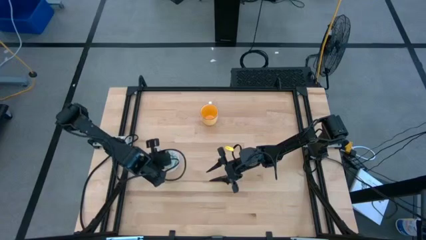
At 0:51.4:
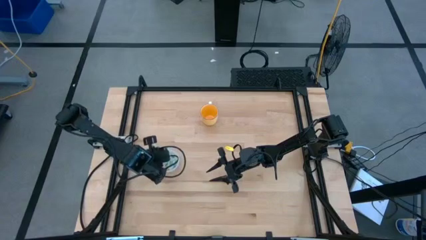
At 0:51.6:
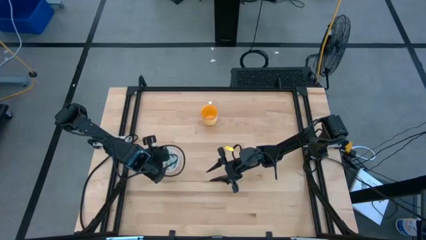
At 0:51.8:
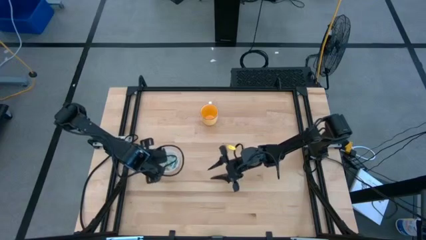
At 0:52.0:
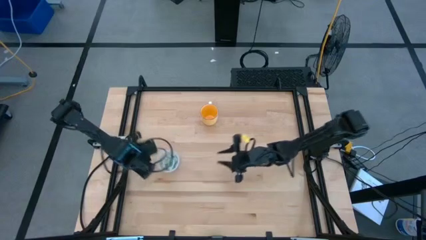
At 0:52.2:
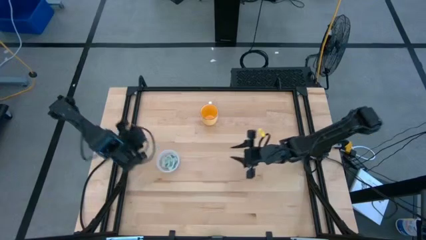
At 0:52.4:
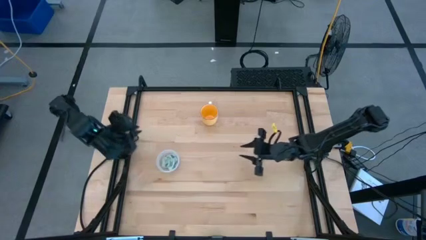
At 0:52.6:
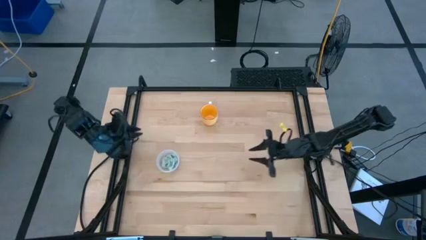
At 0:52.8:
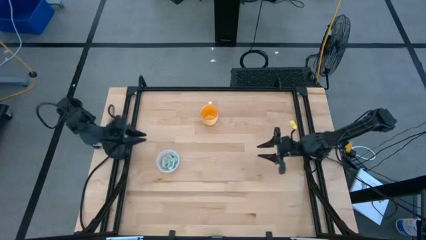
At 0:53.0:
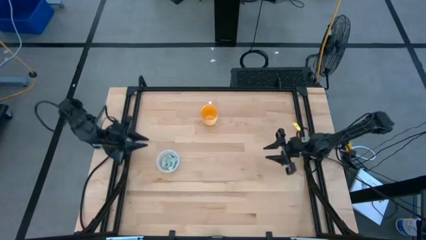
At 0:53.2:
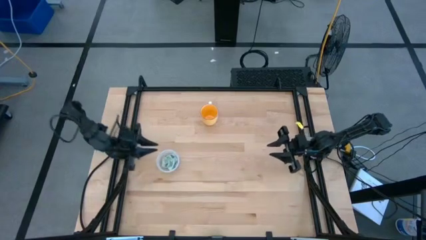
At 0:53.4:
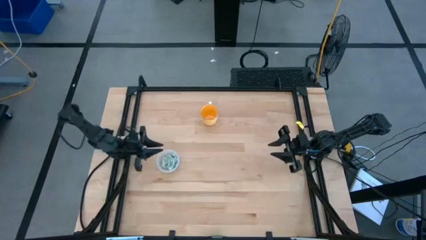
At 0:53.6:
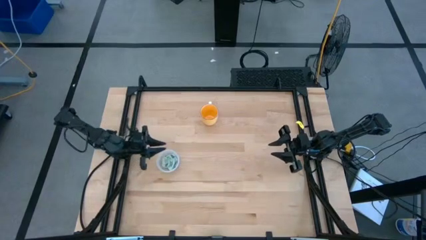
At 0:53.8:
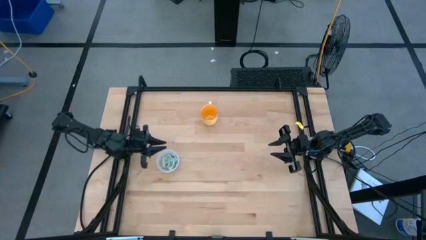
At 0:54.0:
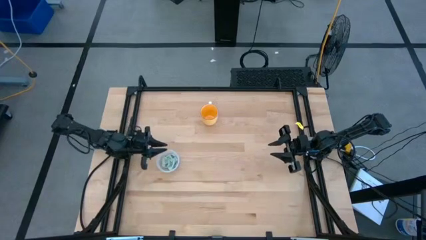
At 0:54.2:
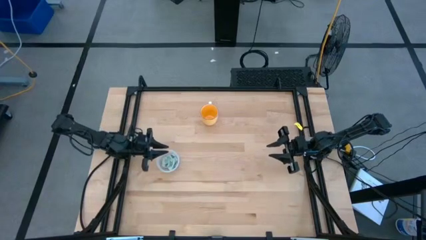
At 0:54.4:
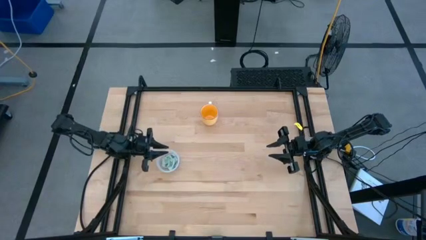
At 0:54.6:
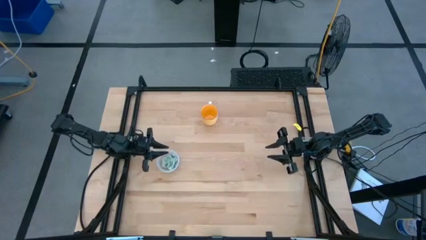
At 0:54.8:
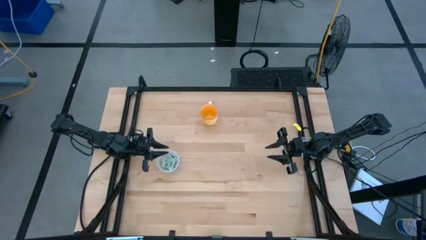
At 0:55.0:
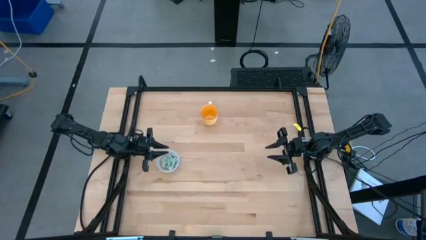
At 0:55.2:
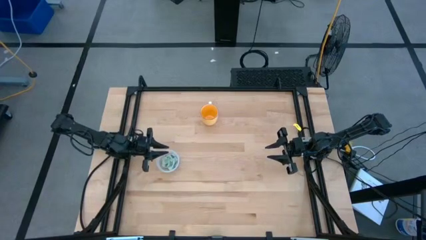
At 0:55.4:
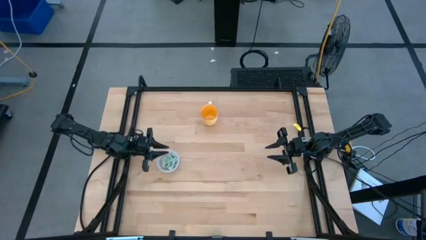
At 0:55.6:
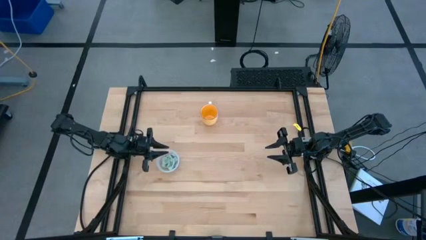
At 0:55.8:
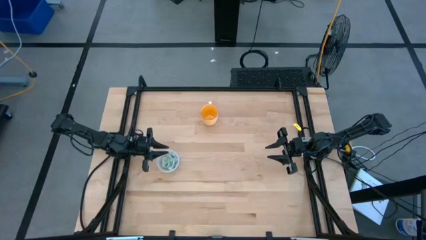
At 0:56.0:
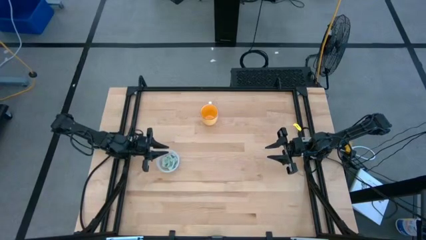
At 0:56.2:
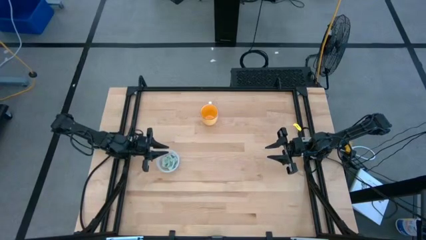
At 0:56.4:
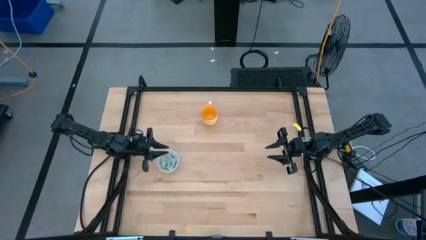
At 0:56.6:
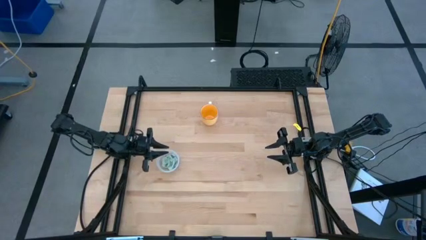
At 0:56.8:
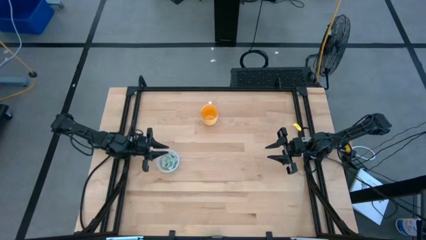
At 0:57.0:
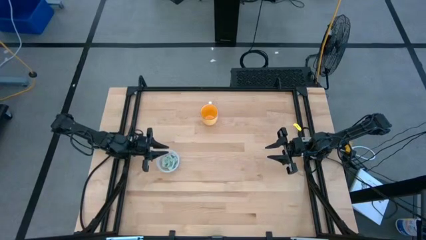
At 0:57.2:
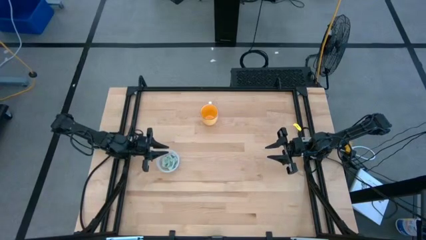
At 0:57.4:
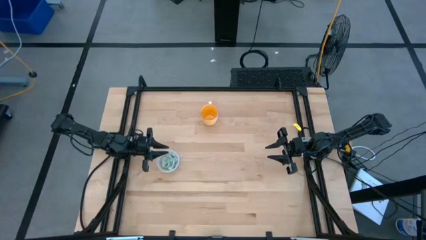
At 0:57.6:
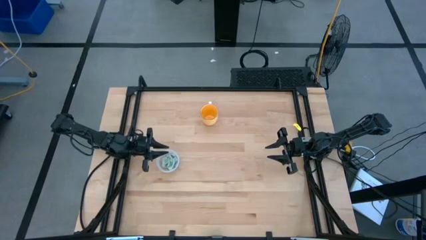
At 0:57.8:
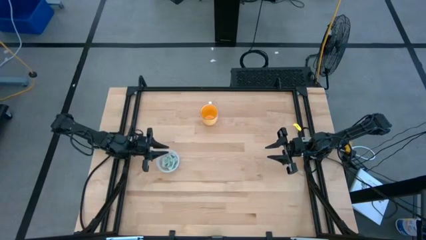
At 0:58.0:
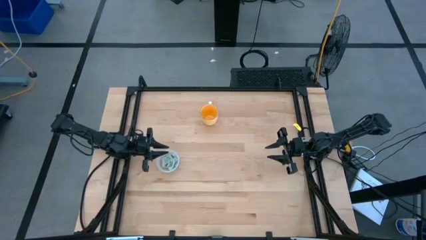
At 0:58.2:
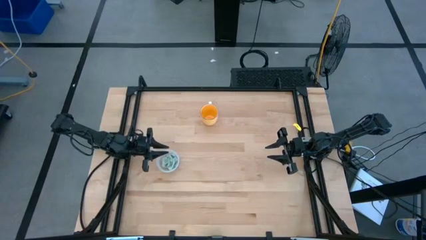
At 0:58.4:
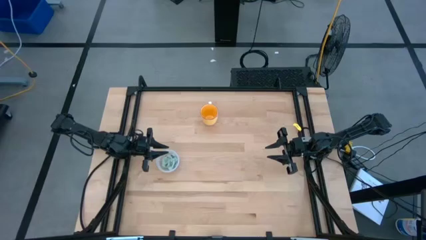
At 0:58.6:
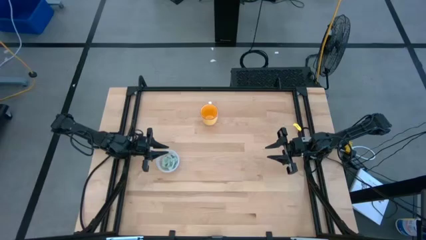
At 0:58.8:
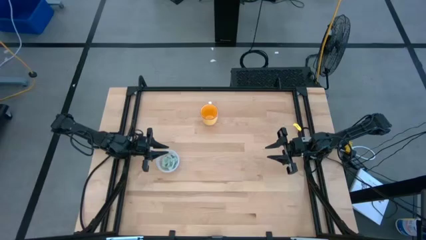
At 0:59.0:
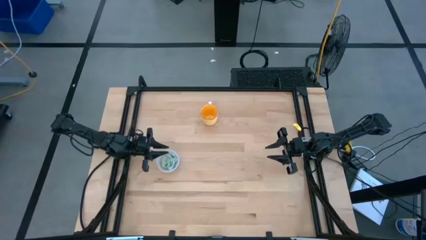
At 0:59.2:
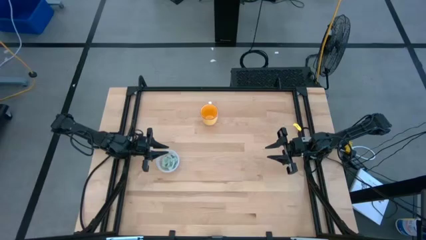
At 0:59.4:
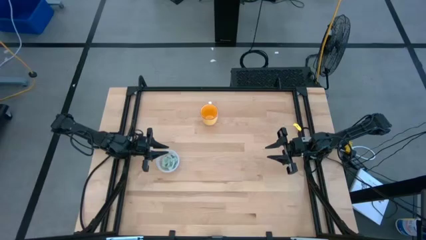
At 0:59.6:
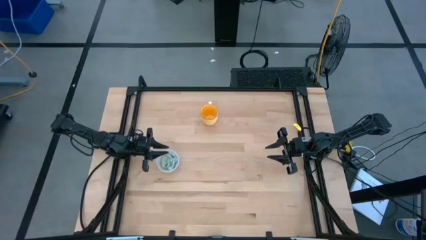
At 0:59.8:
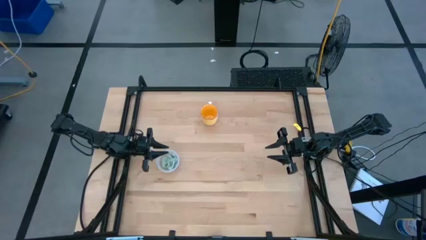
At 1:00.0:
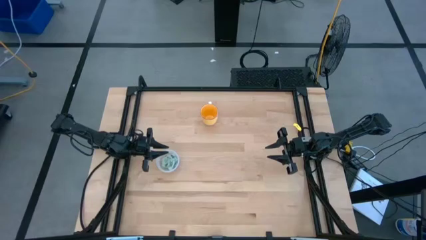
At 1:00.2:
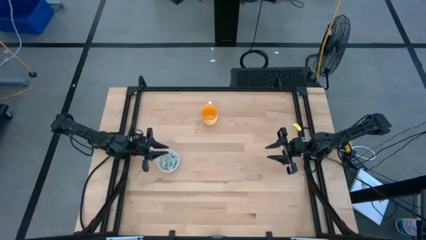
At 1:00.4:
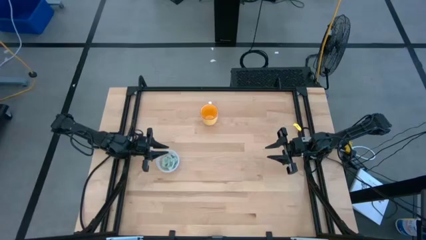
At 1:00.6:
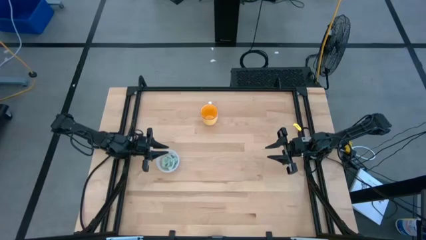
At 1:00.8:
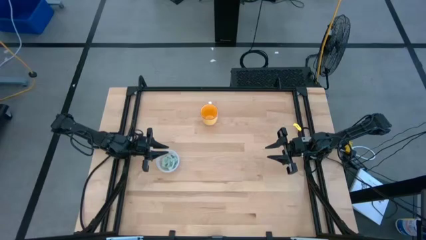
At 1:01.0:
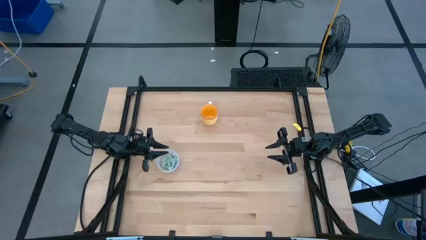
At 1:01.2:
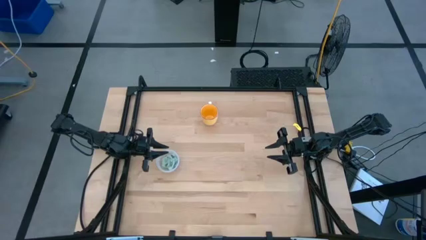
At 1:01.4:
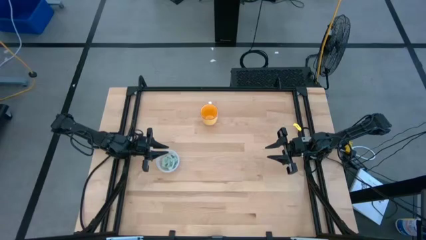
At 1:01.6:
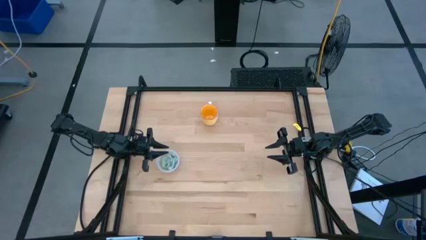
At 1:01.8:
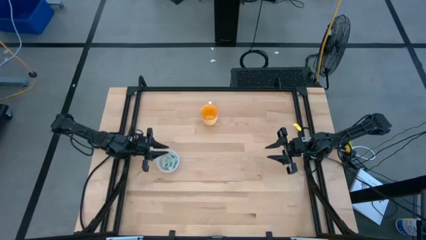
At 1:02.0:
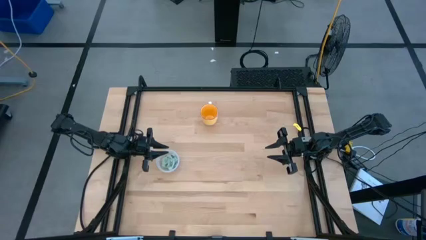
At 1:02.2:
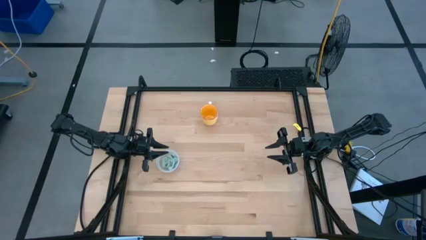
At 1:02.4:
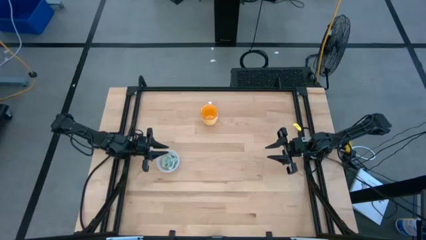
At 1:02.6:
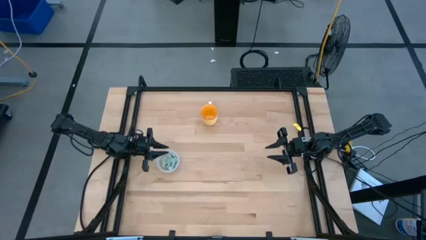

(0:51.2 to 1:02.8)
Task: Pick and place Stevia / Truvia into bins
Return to Home Position

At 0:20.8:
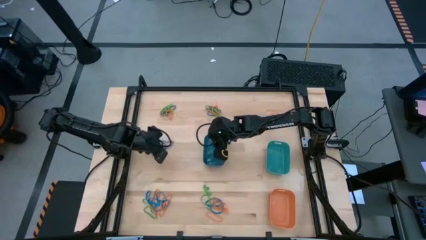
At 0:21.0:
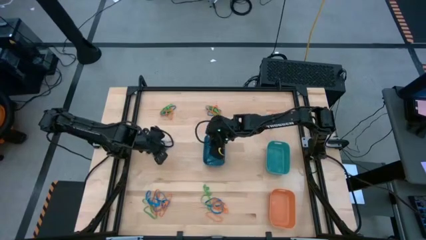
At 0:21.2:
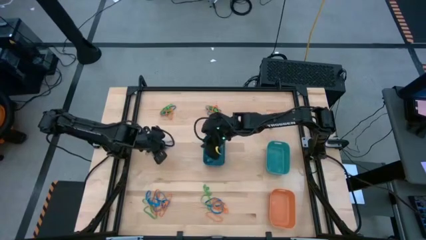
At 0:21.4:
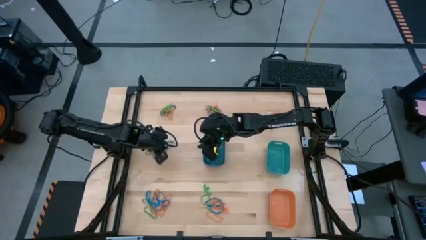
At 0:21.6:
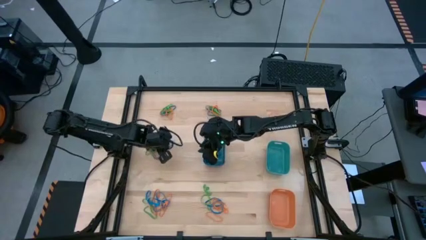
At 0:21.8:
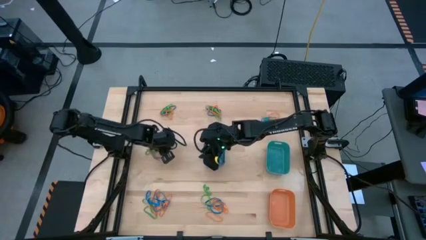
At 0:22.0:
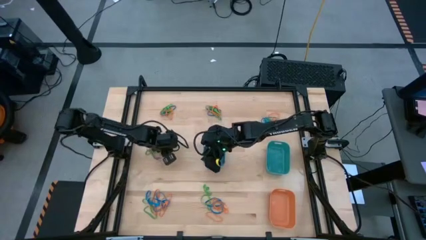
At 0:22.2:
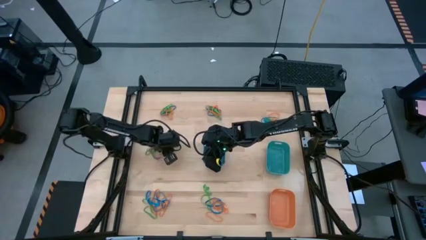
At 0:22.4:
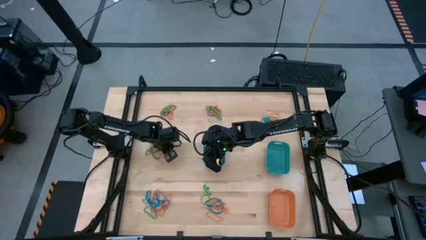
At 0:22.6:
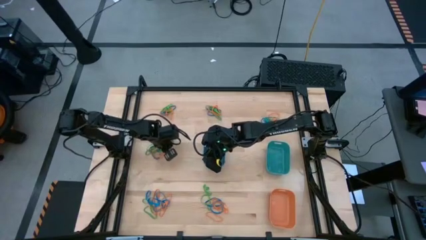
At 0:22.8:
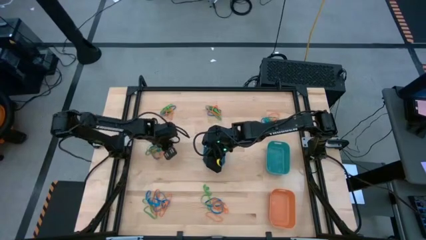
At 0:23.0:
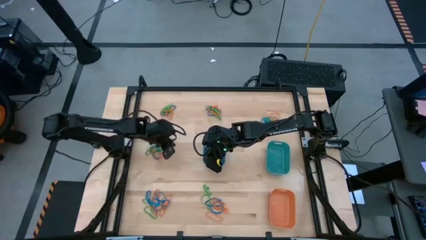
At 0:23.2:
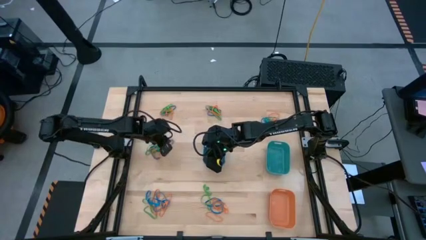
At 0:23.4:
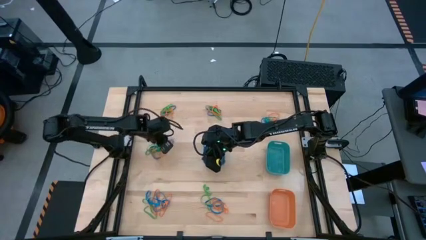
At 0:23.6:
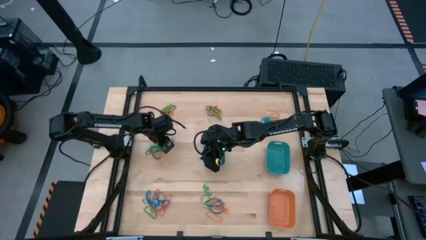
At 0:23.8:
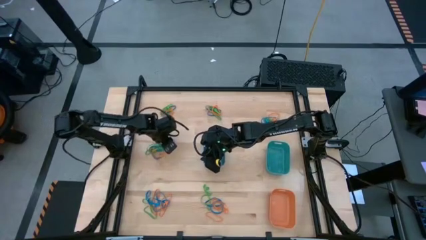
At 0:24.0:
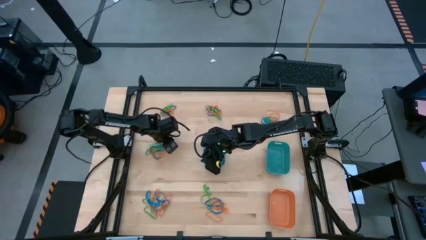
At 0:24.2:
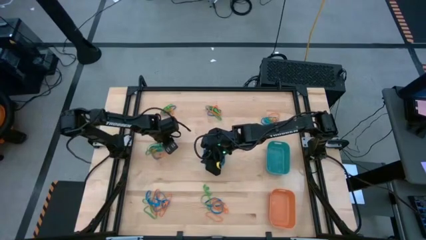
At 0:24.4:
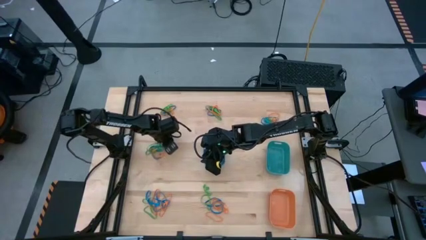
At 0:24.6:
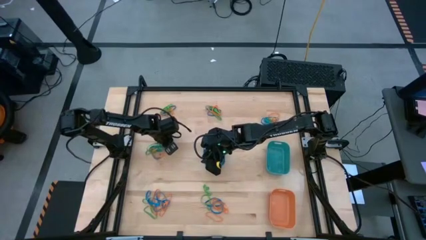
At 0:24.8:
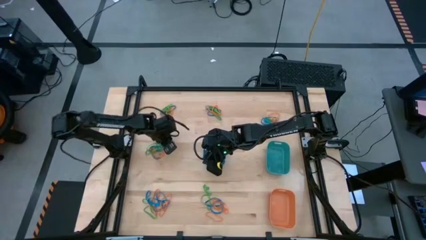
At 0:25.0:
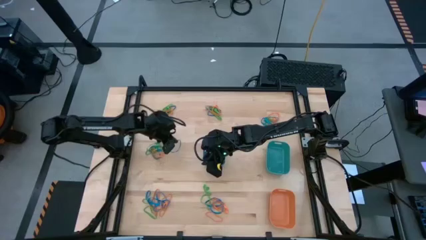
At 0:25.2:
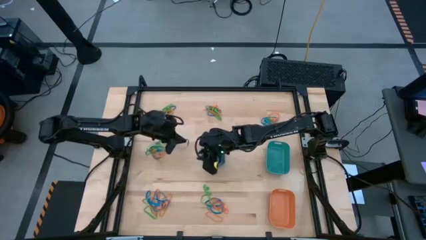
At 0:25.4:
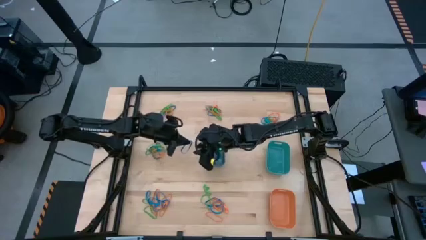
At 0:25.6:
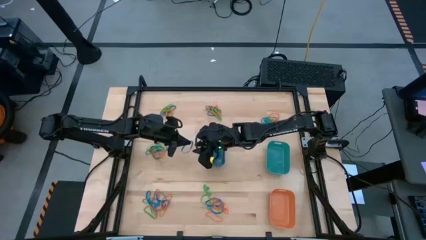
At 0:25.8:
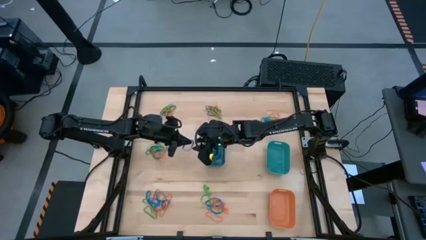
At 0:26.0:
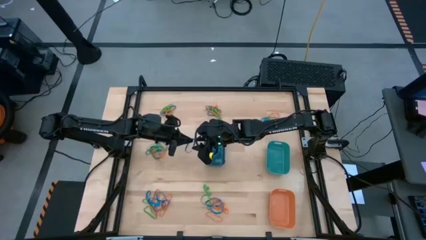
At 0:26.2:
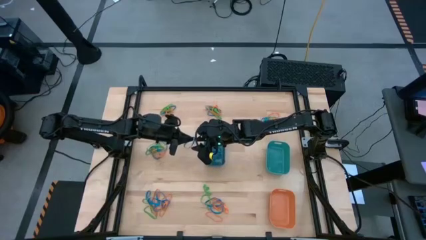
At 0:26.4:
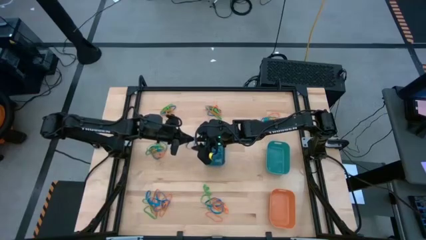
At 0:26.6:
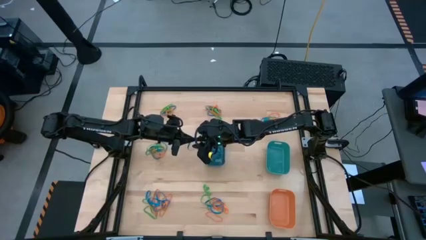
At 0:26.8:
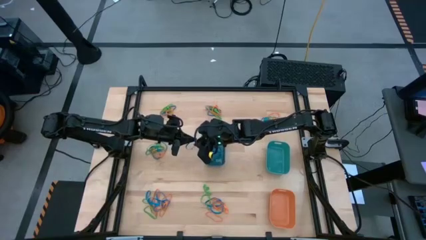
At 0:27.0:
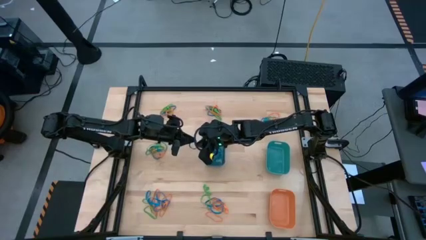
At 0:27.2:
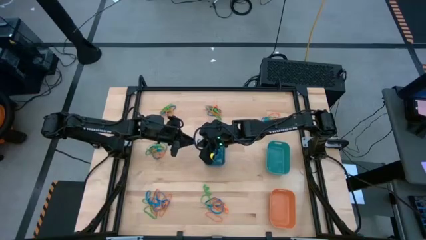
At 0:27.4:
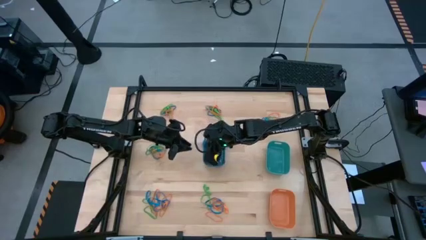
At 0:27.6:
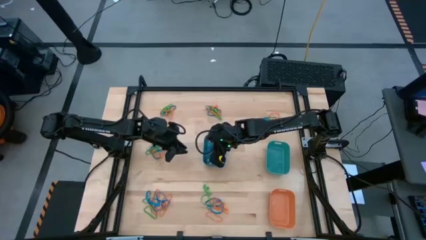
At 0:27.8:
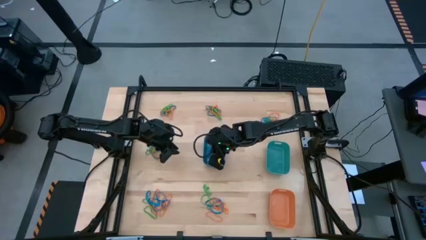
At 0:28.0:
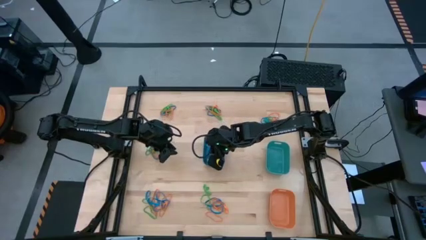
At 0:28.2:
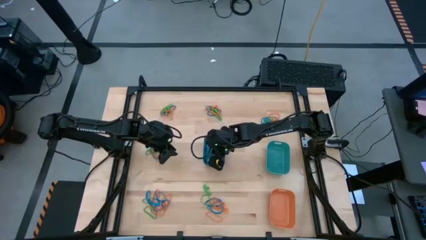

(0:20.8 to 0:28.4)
Task: Sort rubber bands into baskets
Put the blue rubberband into the blue bin
